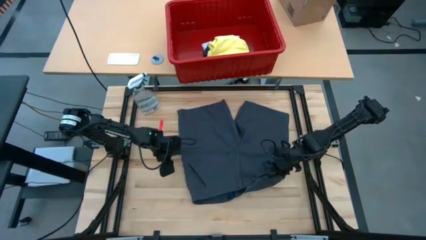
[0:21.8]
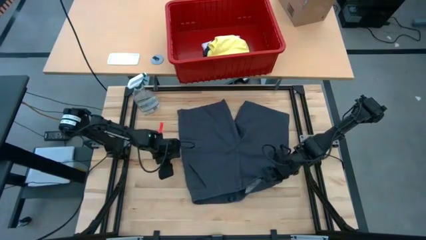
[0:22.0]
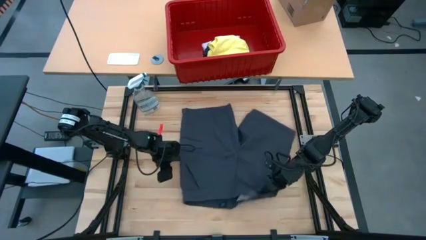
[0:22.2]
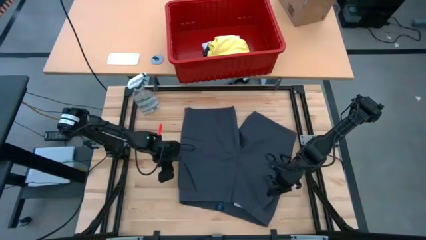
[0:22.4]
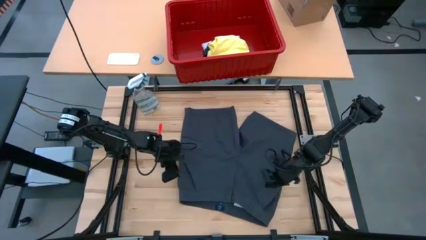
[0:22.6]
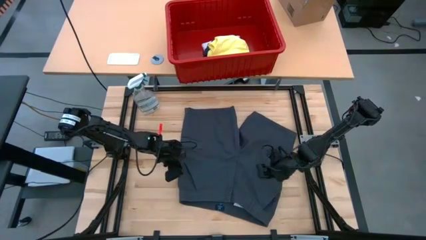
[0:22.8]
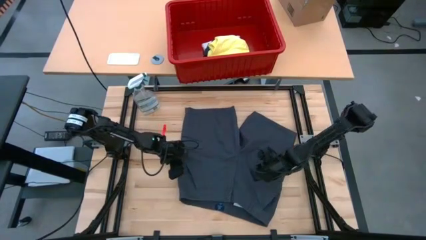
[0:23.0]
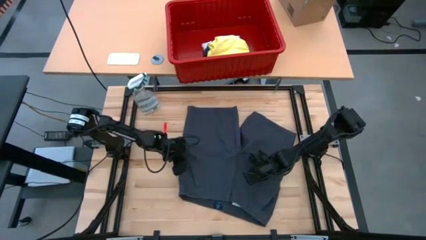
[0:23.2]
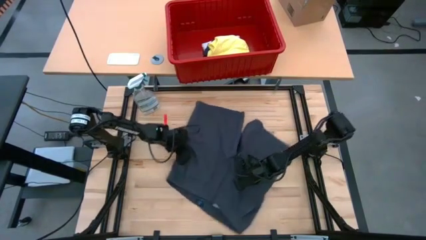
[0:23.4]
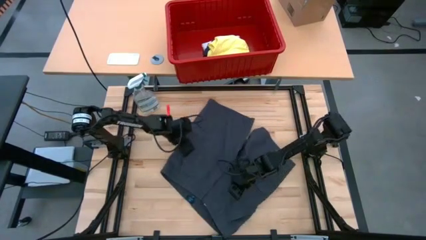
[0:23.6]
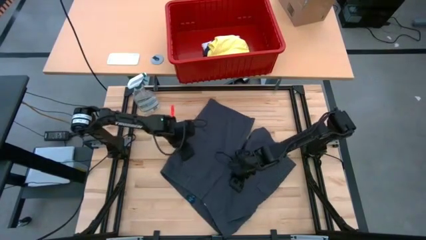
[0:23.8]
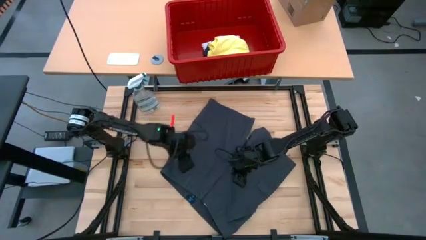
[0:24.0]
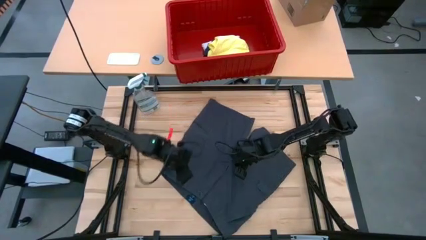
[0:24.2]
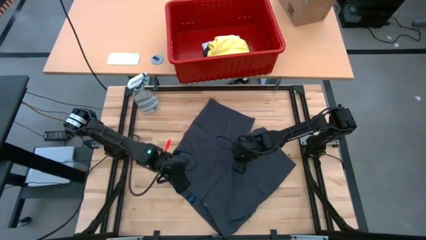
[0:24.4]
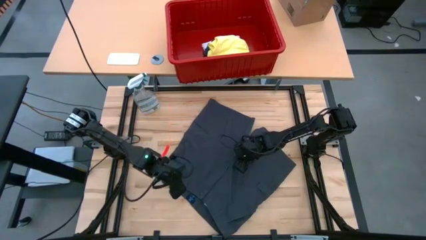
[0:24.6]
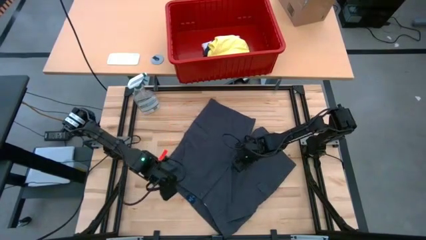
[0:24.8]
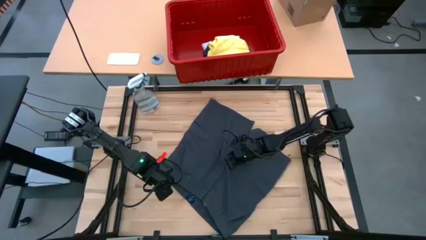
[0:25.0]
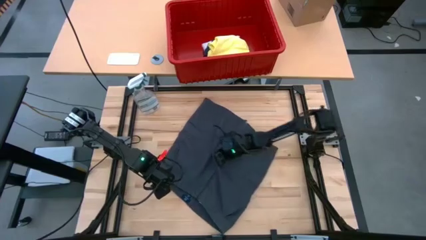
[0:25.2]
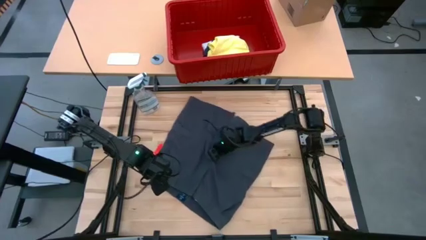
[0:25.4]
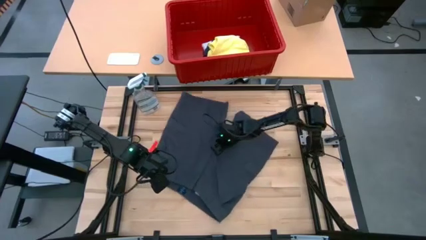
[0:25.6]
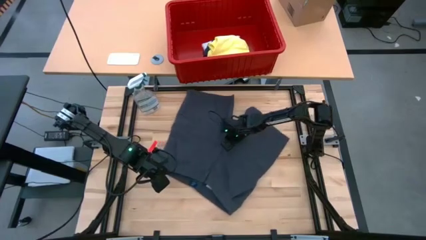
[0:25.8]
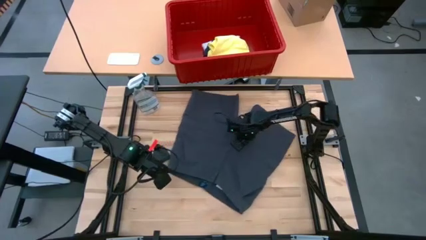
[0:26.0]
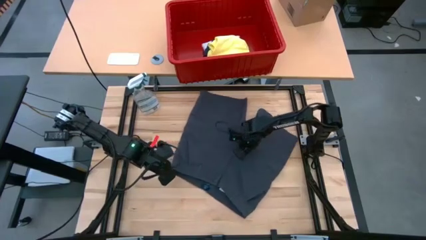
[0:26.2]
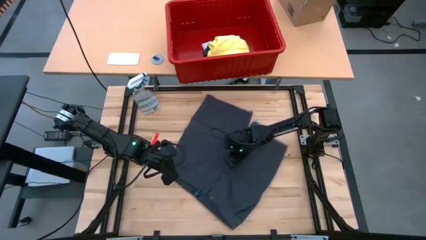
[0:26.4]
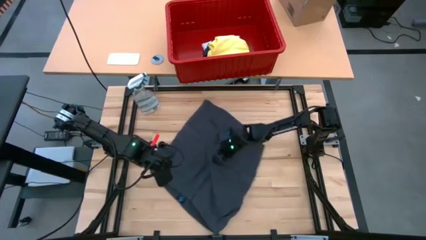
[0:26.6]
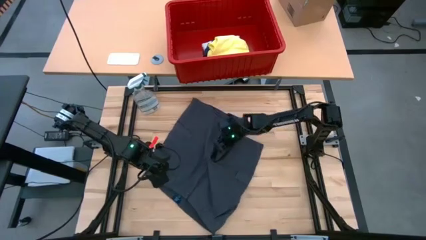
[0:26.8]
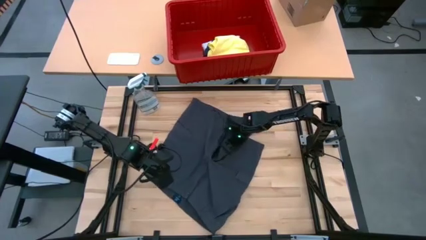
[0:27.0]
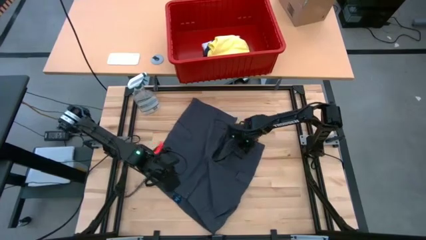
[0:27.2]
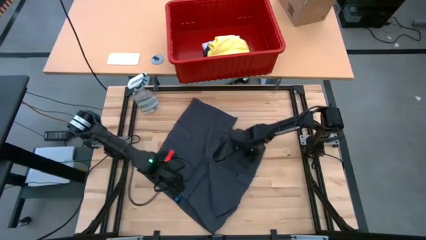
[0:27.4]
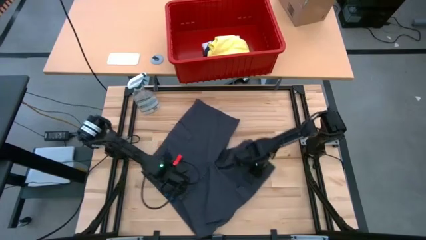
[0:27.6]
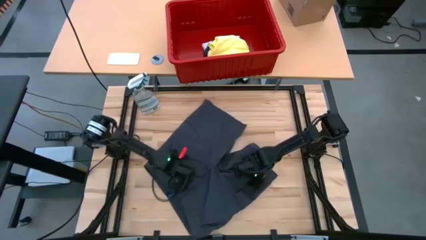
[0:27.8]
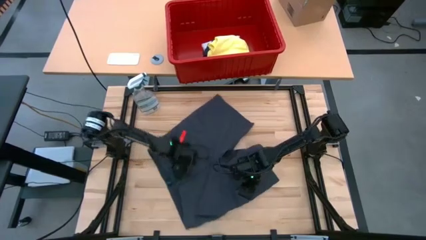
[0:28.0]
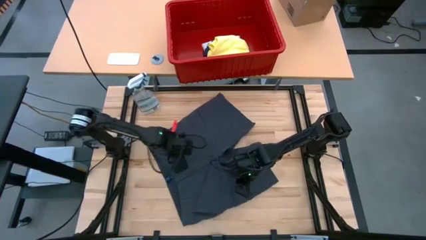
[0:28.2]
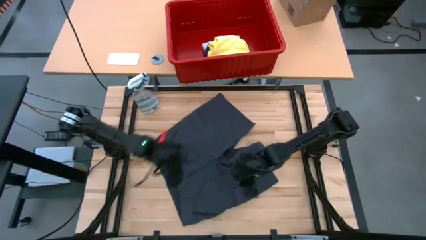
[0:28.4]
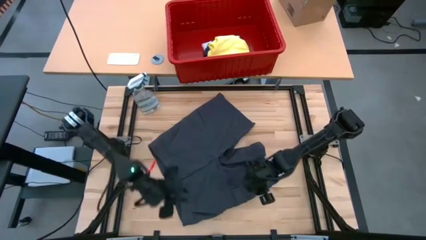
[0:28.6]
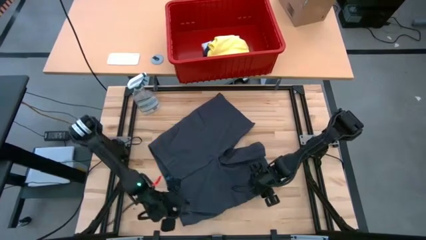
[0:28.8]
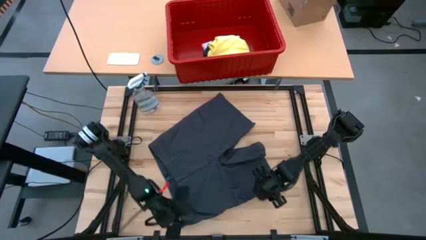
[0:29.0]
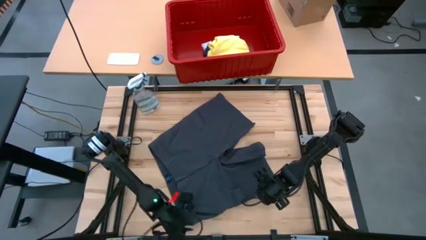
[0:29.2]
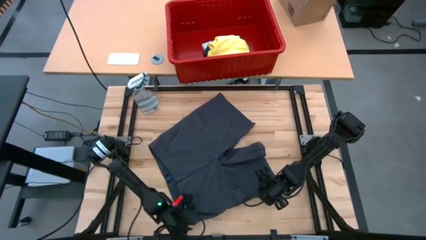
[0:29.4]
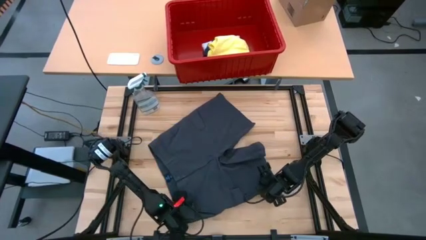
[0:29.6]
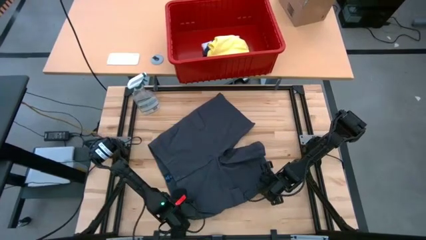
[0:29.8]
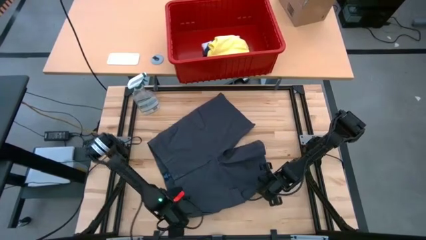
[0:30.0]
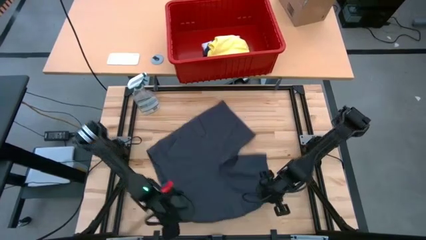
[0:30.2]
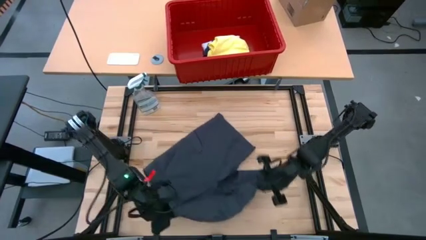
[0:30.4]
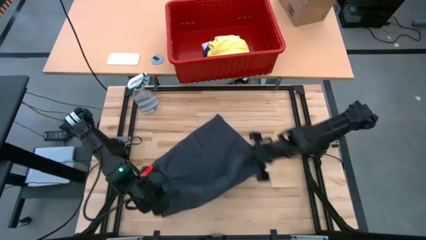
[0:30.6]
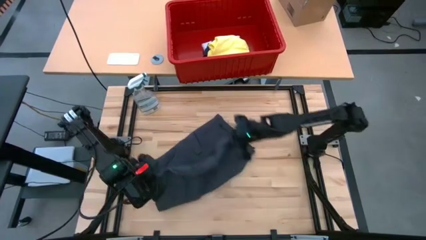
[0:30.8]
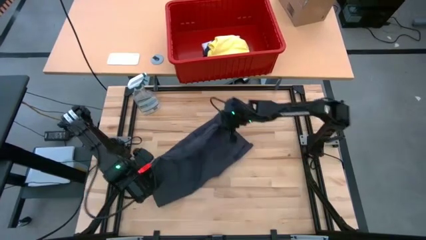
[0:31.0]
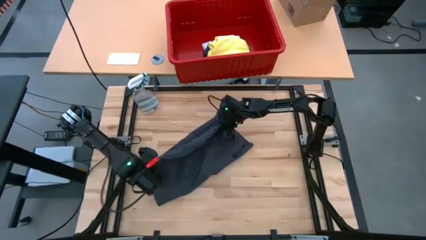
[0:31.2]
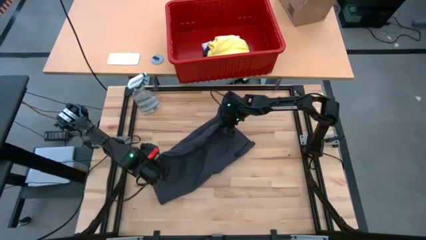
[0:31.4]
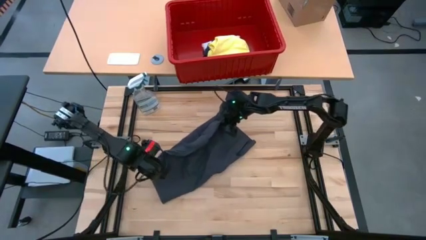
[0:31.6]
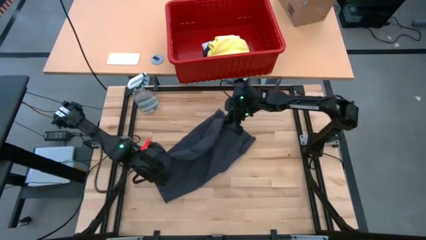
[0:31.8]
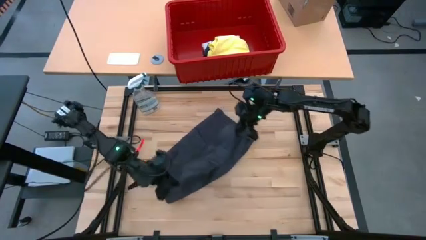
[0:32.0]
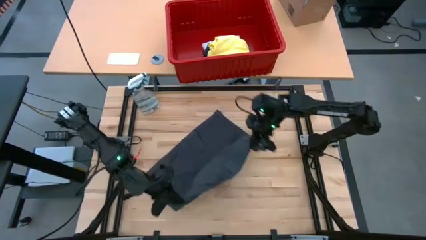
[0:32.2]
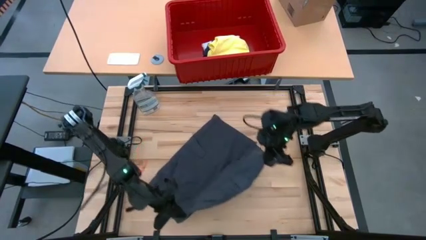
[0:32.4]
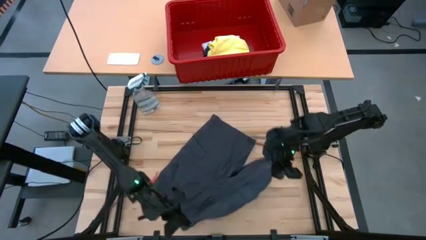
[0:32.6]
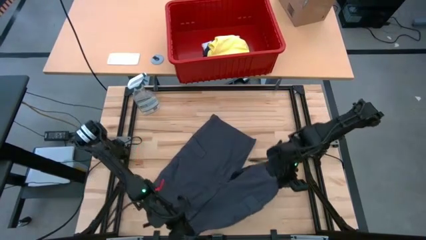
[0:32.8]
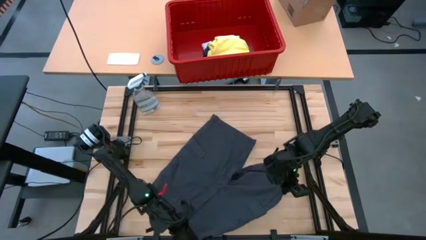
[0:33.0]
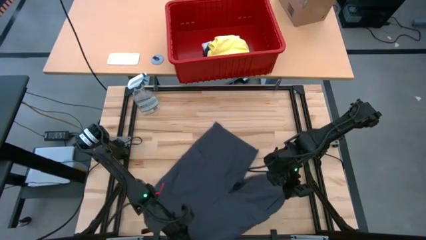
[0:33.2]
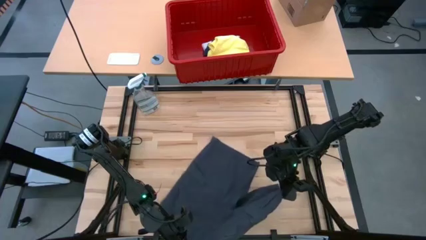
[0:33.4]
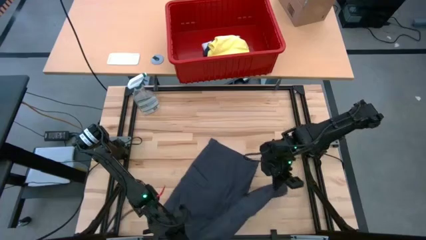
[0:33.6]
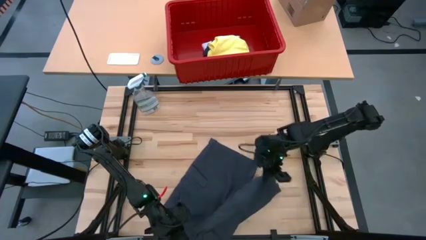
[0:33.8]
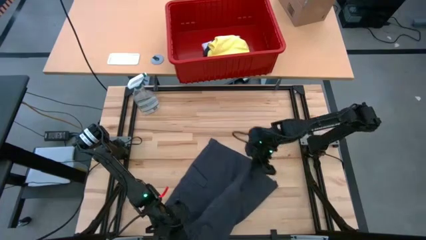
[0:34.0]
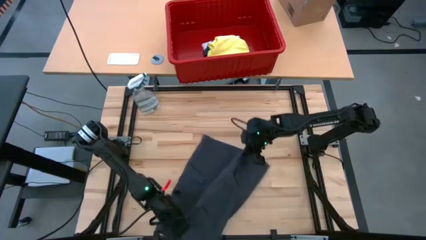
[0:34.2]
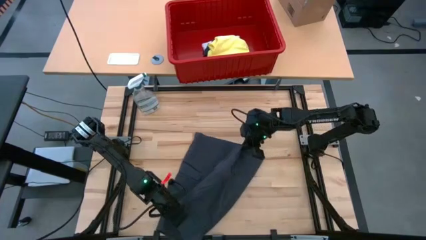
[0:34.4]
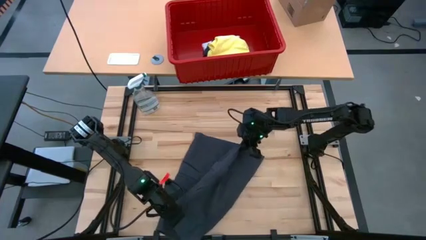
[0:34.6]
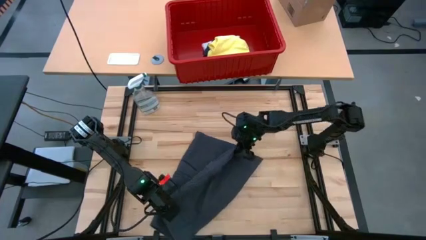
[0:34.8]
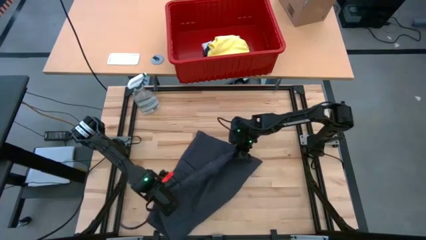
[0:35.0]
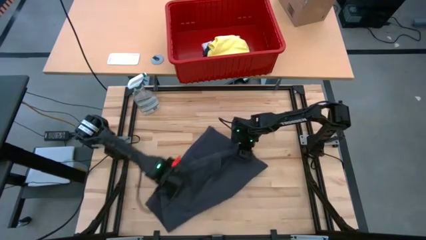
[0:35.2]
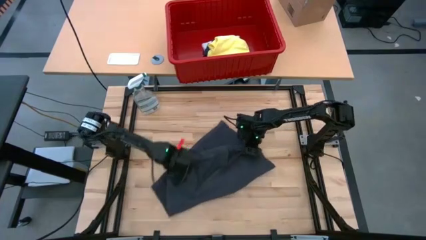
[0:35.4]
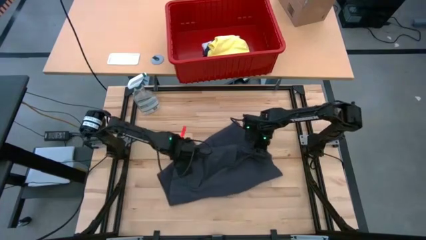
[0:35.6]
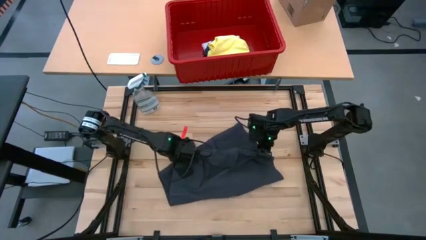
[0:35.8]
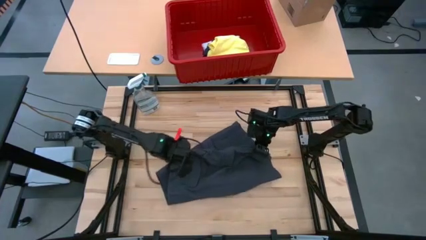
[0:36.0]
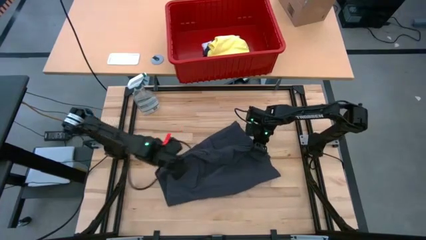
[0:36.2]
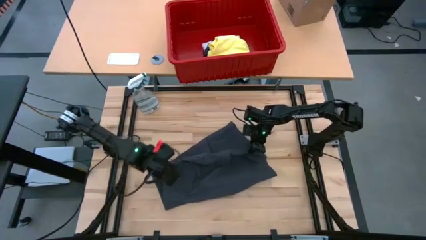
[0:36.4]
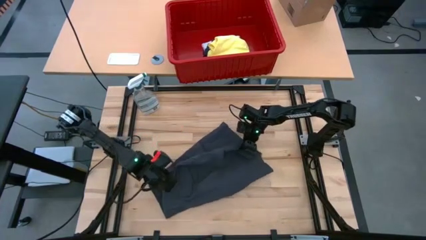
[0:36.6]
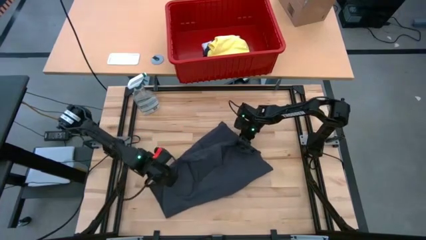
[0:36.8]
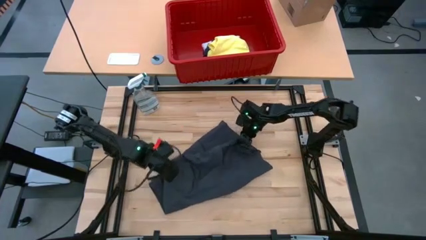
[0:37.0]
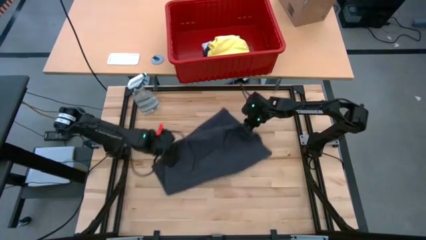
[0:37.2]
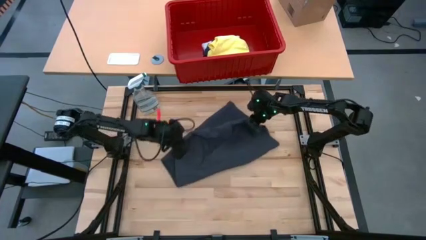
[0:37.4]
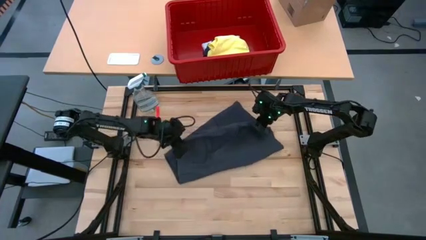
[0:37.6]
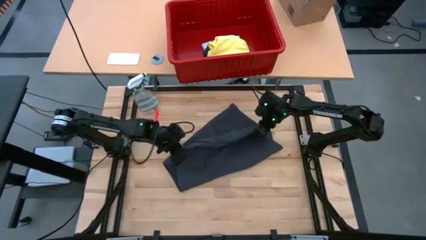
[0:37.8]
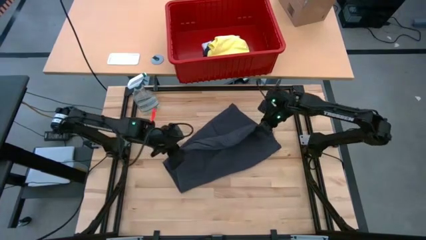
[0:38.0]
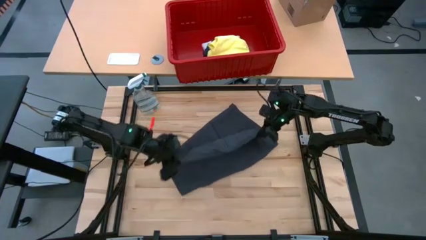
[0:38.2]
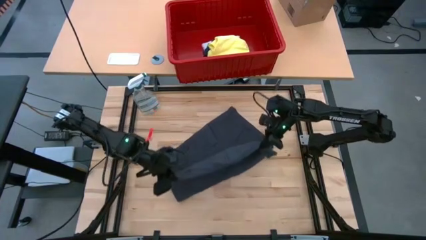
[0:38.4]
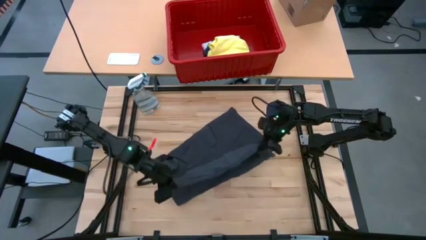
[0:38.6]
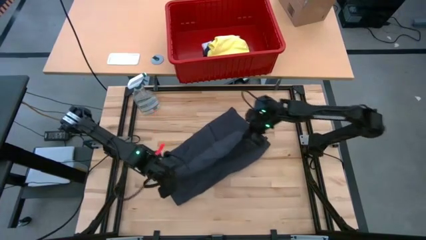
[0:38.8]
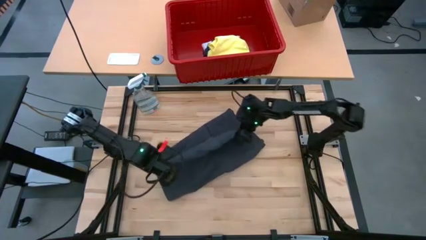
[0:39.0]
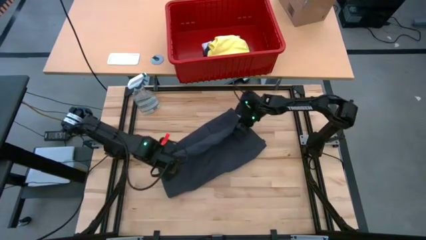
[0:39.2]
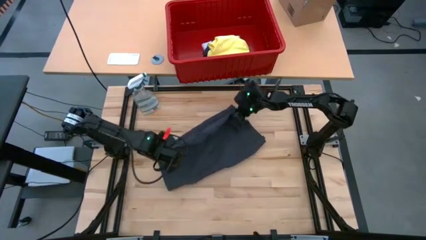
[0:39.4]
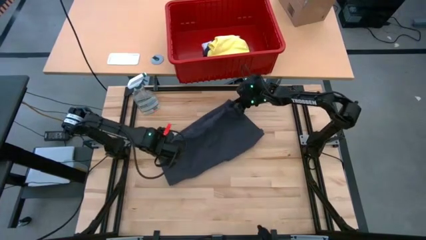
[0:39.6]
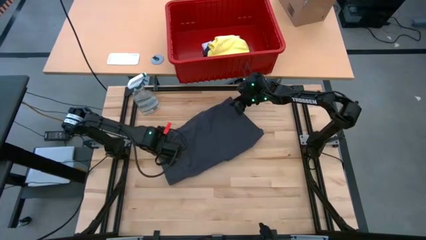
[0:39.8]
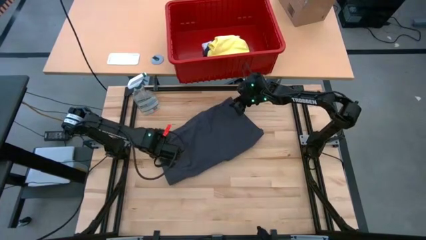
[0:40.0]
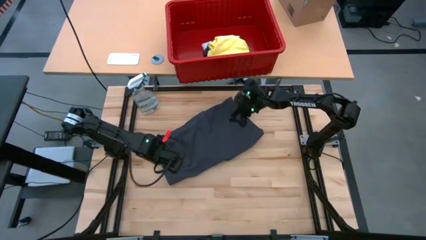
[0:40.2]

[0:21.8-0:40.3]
Task: Fold Laundry from Bin
Fold the black short
